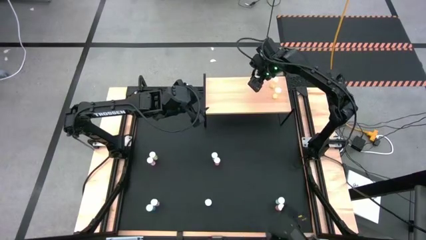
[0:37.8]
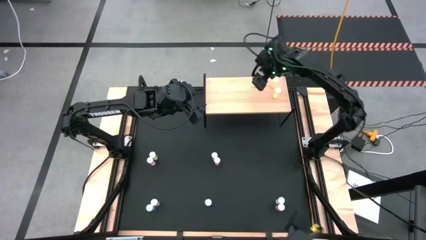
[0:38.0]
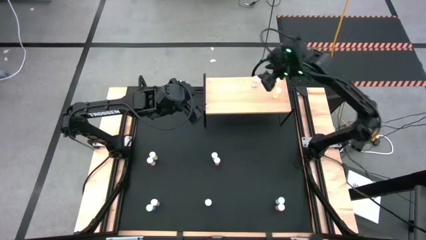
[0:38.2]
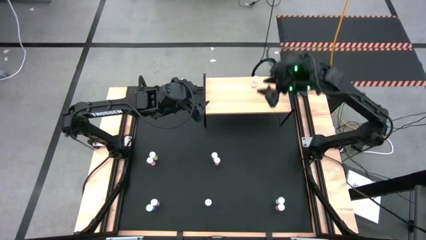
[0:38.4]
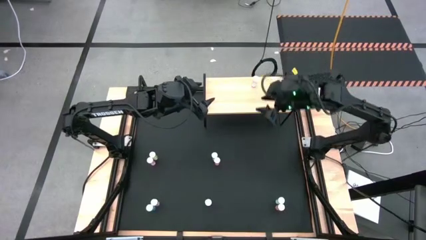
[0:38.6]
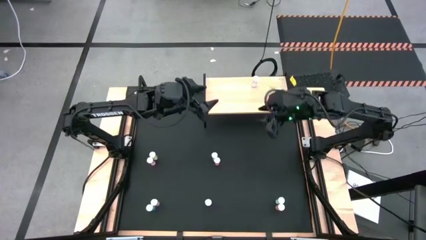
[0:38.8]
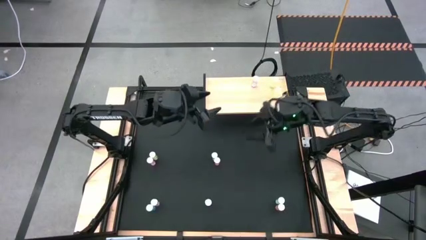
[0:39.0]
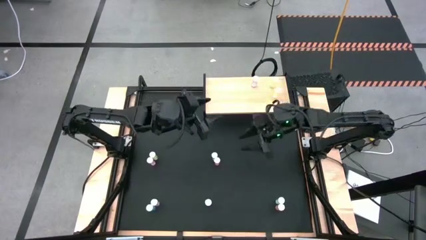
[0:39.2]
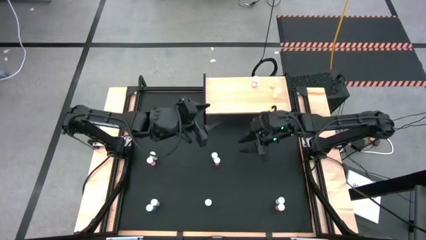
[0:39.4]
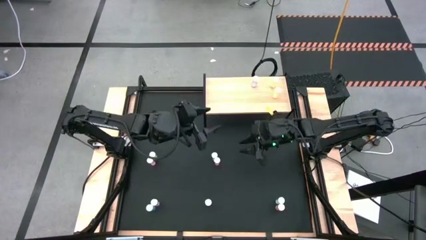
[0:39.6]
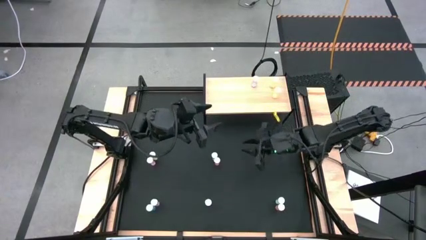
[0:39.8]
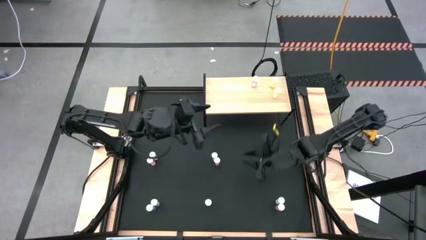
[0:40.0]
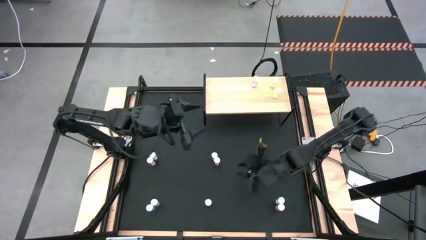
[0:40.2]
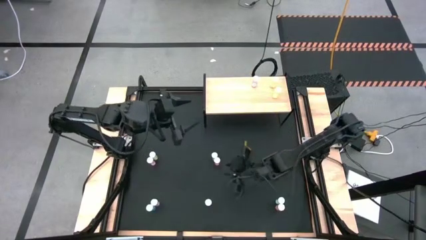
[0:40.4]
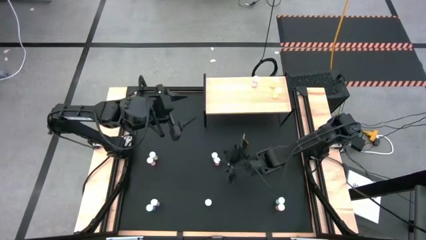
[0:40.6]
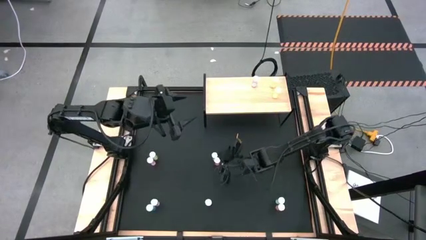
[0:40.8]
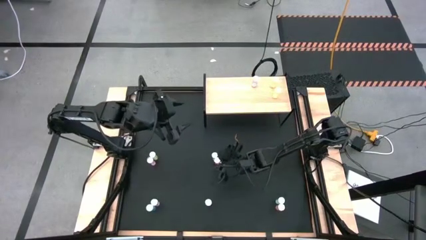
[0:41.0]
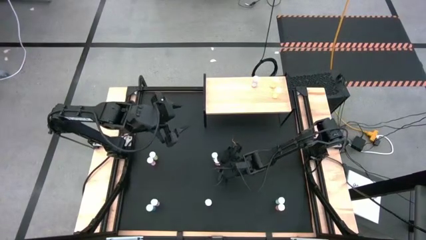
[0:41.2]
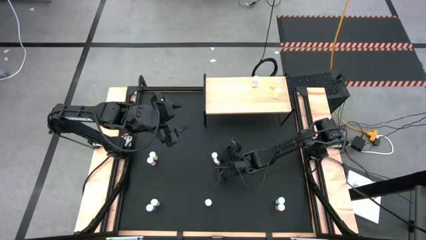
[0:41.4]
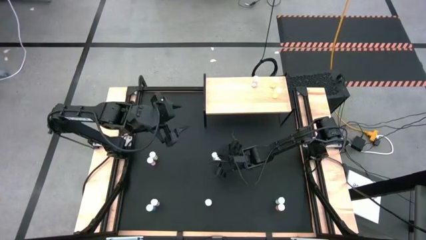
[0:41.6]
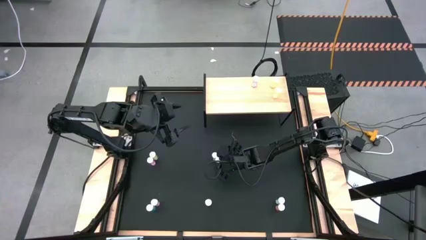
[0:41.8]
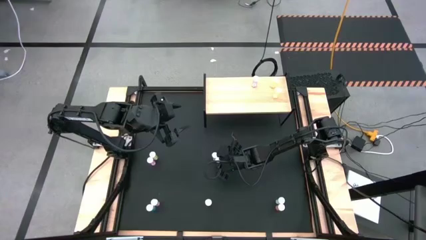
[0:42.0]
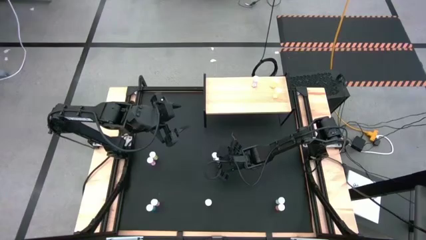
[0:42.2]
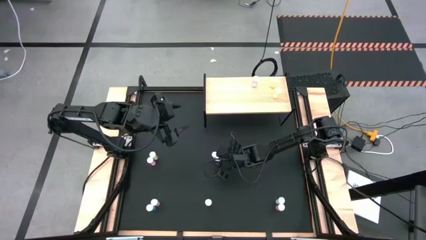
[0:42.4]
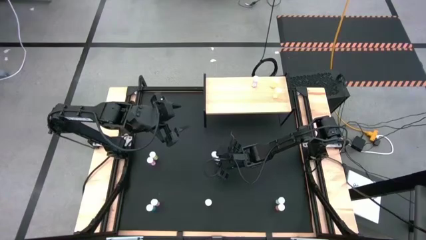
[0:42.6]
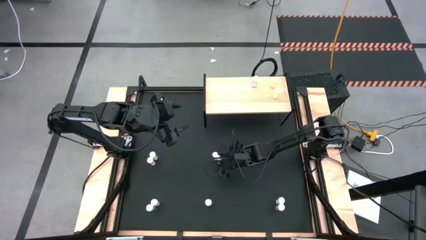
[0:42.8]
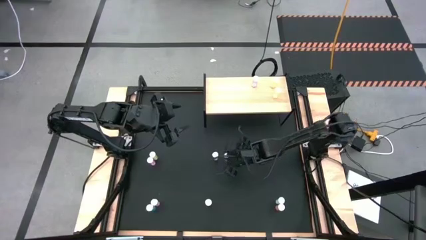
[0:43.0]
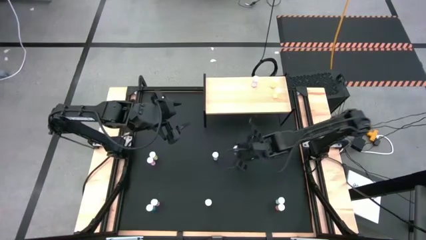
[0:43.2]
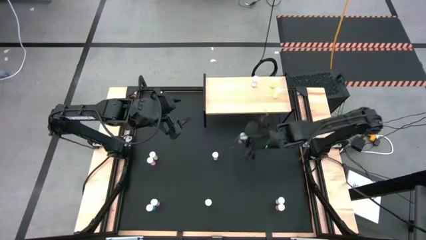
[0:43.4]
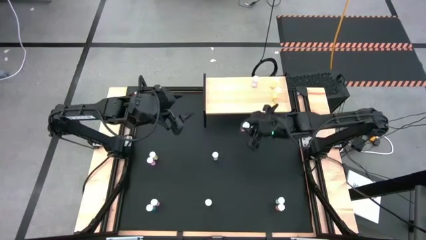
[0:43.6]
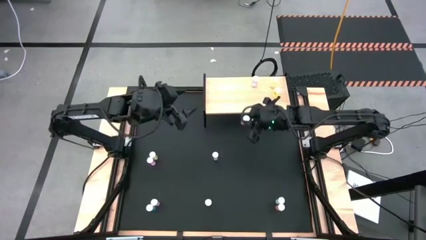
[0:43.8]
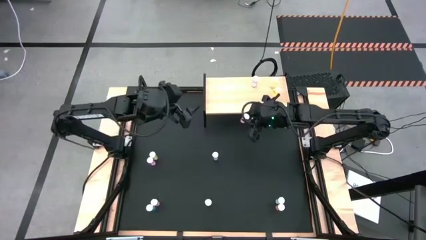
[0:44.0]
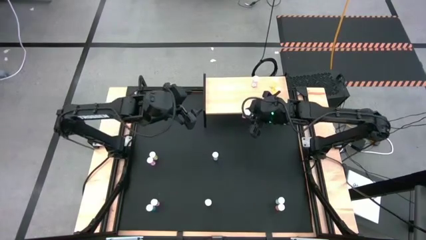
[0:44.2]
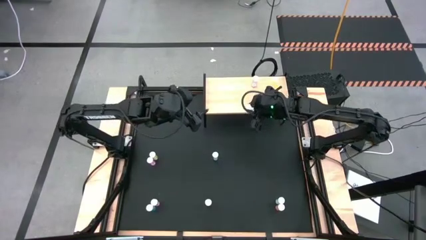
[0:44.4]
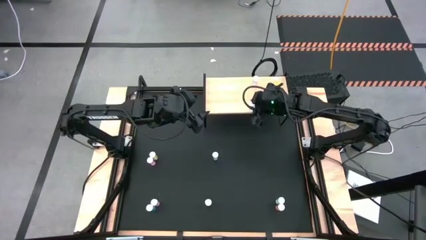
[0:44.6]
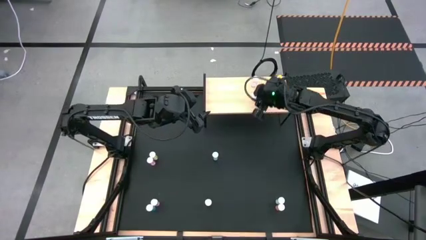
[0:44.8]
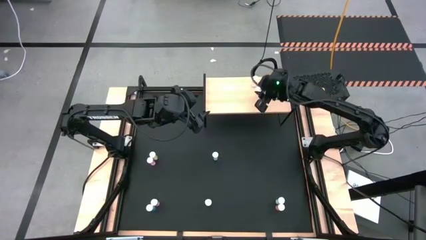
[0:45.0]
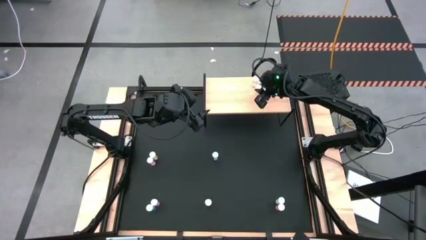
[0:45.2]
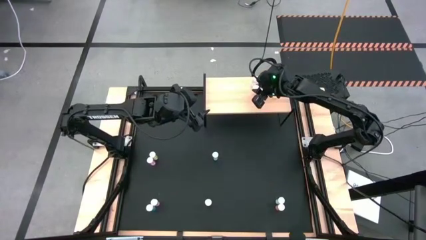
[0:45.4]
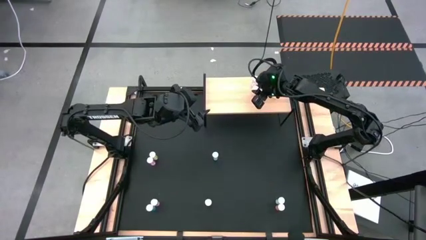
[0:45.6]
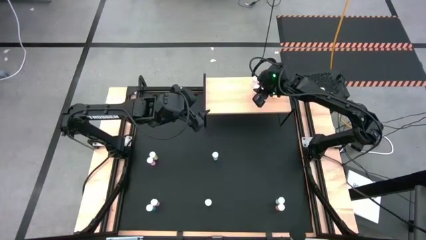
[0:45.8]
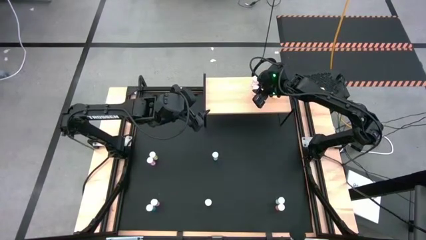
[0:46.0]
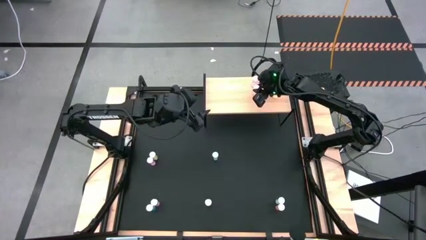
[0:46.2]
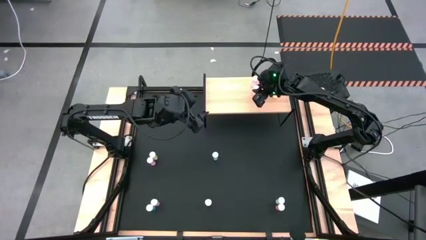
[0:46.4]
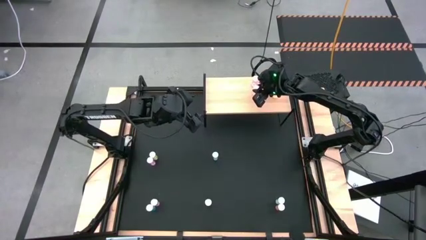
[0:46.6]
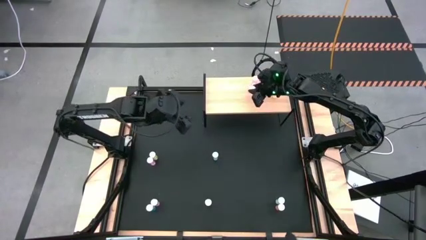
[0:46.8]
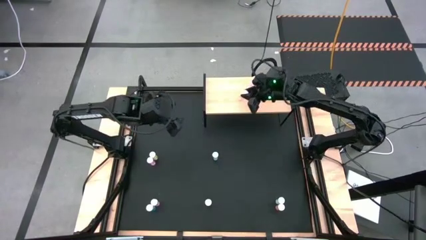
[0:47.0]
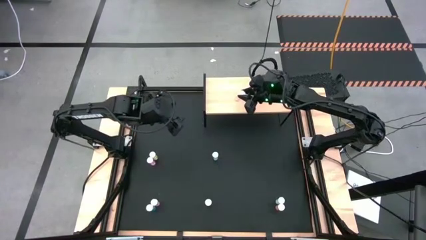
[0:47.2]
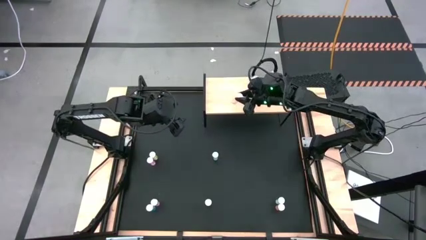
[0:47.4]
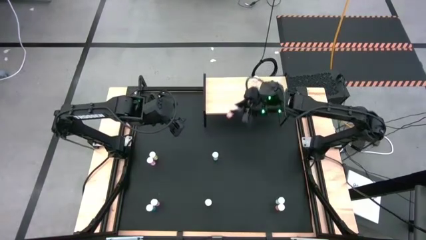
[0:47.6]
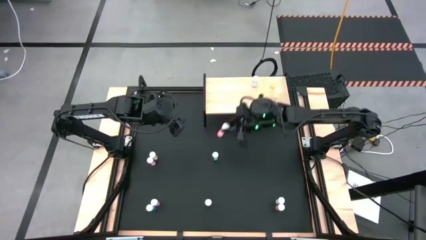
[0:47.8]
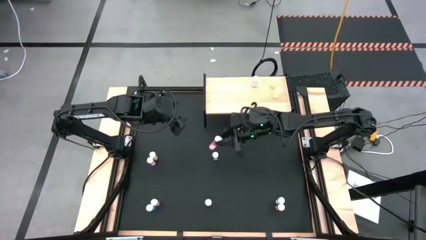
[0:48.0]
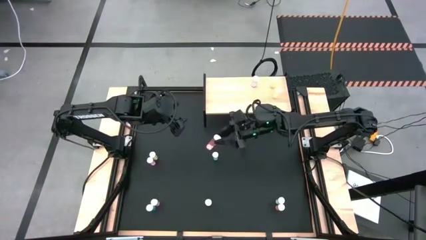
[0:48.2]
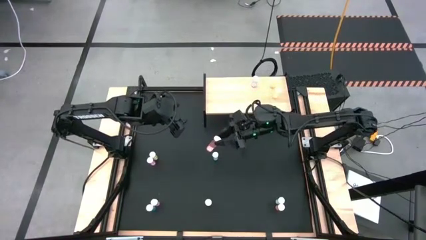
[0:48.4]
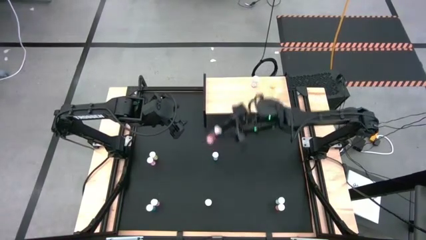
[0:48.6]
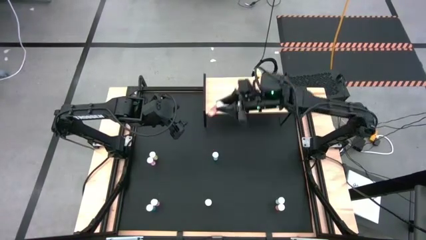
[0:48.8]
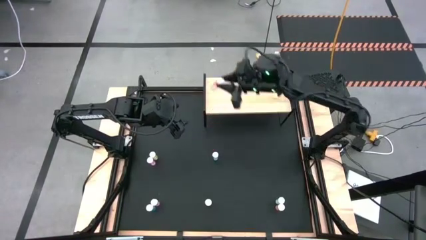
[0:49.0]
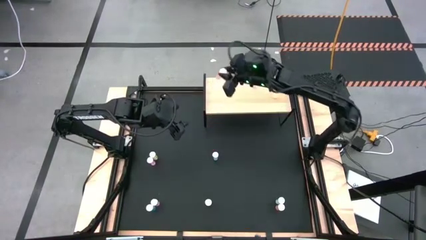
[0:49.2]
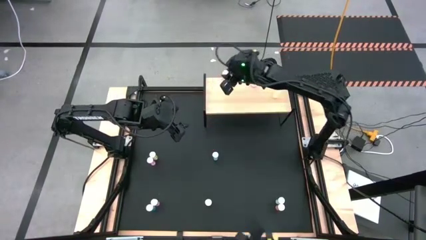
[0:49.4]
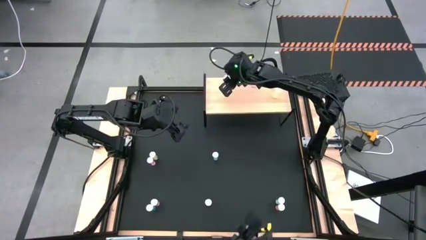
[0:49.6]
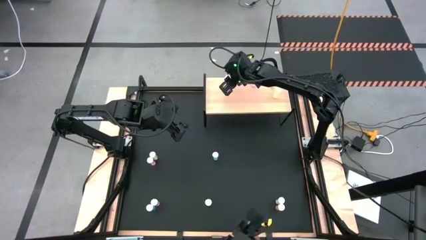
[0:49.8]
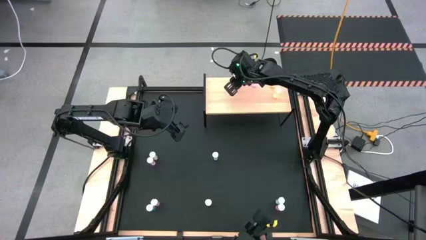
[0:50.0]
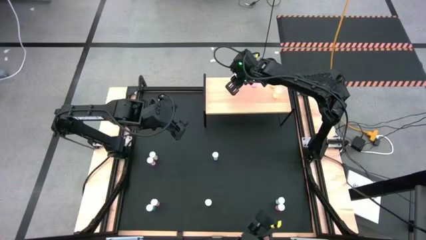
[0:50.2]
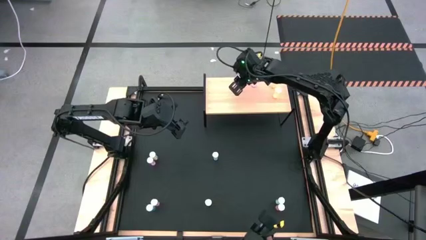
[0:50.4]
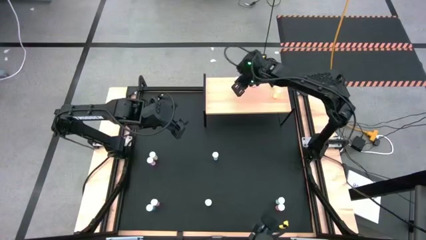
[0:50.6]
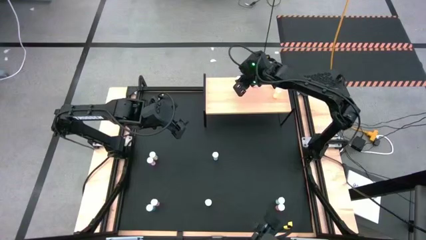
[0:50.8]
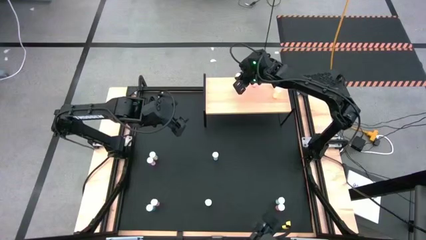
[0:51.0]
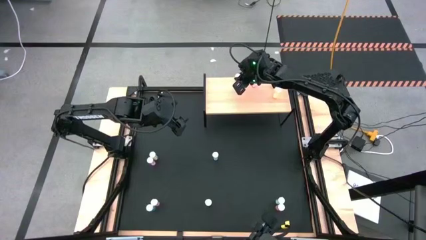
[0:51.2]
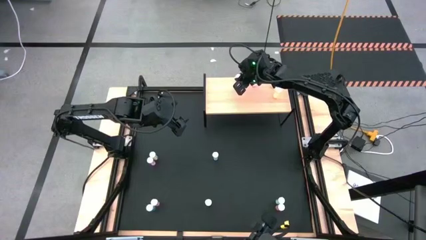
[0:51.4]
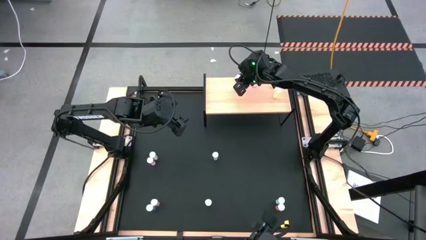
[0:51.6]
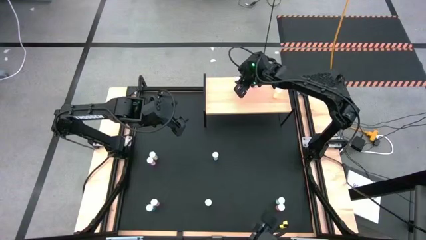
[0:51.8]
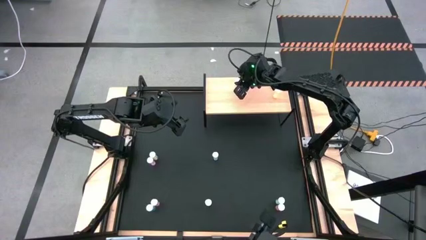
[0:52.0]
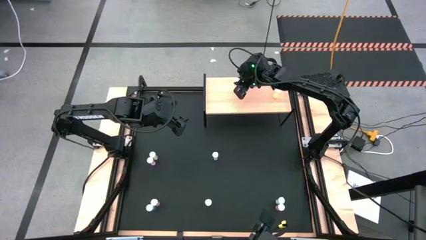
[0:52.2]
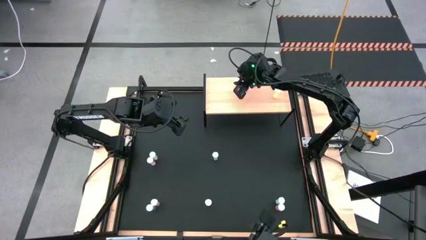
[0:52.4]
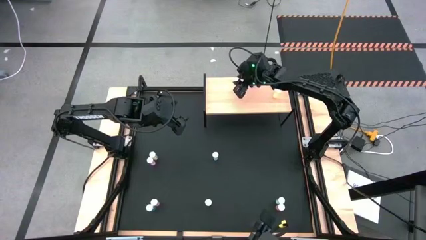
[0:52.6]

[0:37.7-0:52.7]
Task: Pick and place medicine bottles onto shelf by color
Put the top left orange pill bottle on the shelf

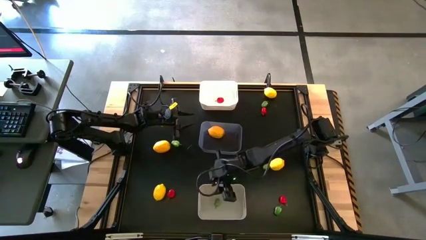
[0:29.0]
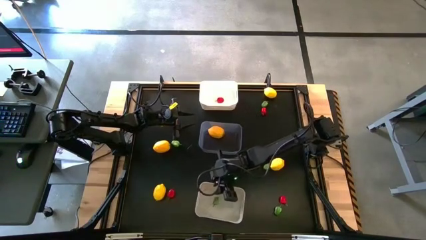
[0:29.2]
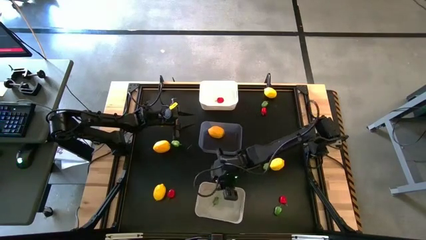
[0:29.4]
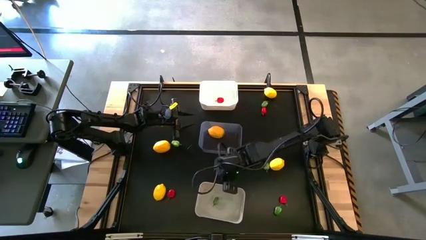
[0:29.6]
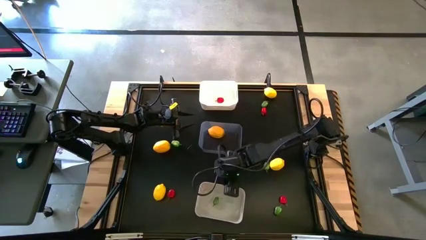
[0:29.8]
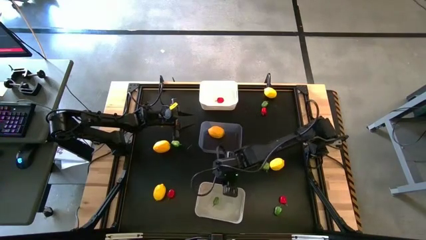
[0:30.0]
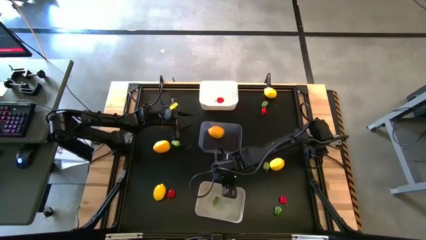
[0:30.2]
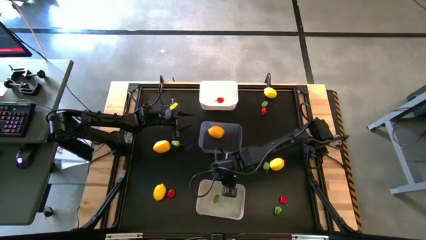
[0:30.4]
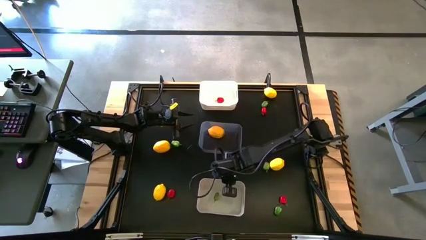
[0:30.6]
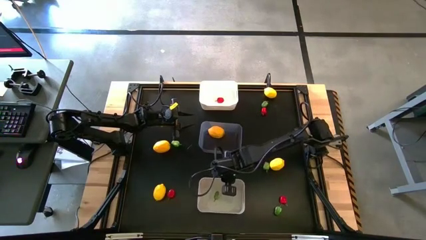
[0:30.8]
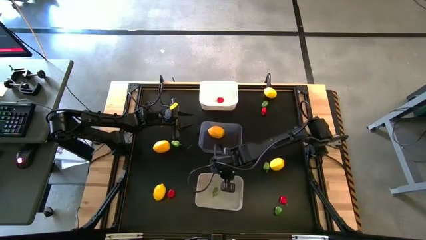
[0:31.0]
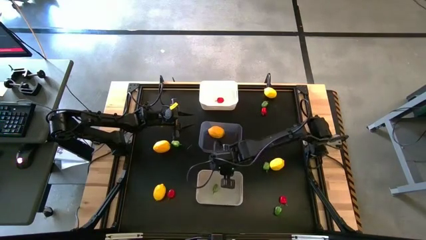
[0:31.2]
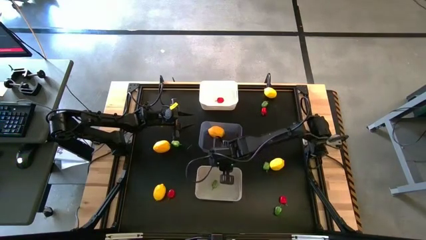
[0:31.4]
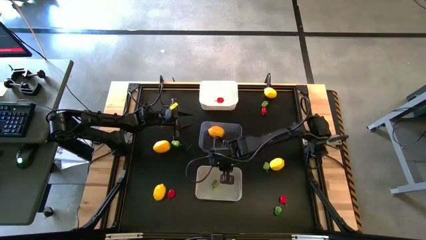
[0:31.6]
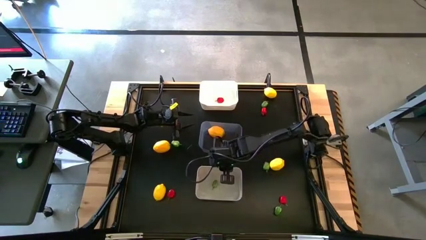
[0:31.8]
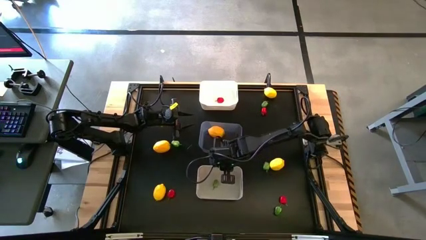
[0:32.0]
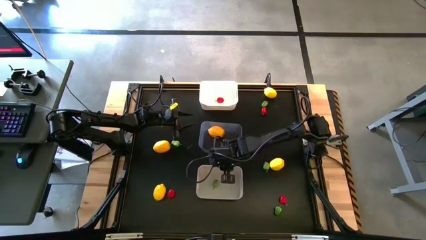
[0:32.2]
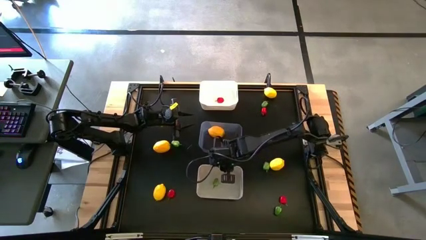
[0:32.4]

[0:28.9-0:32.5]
Task: Sort produce into baskets
Adjust the gray bin
